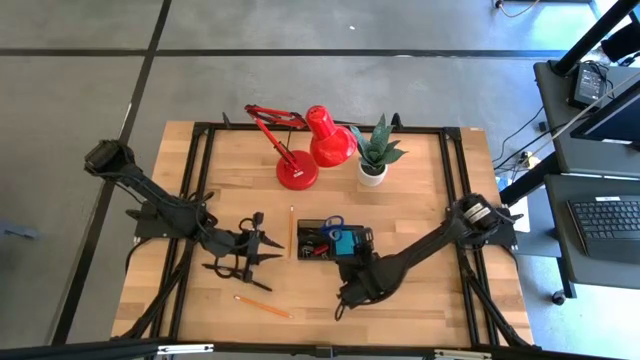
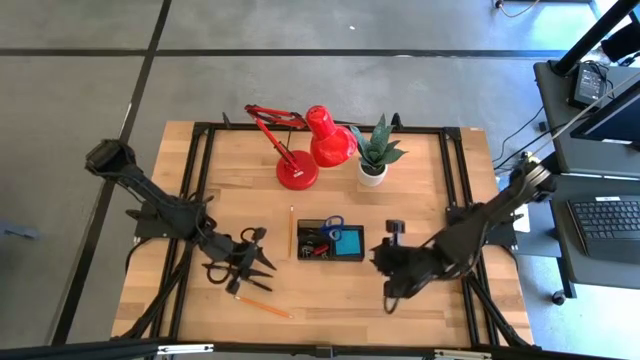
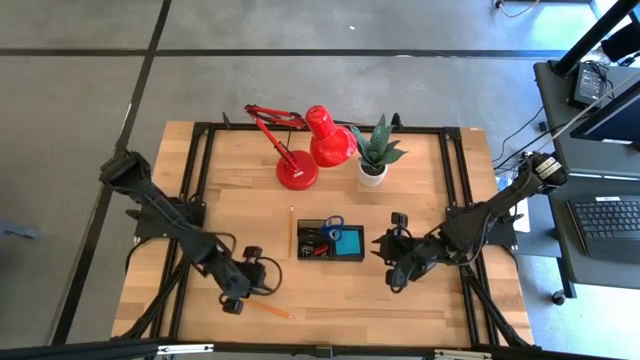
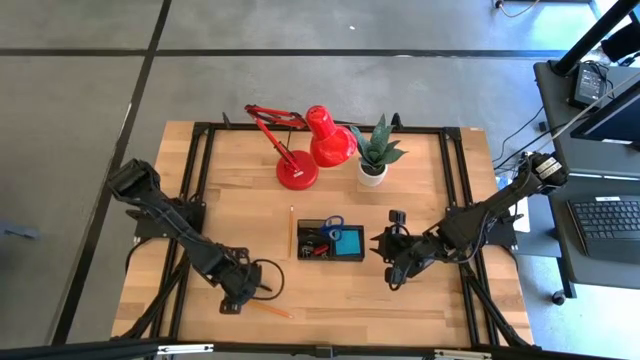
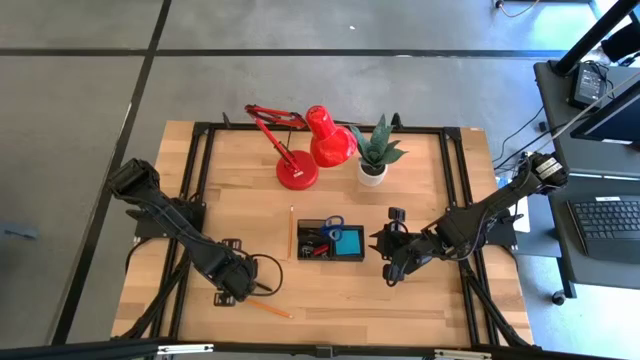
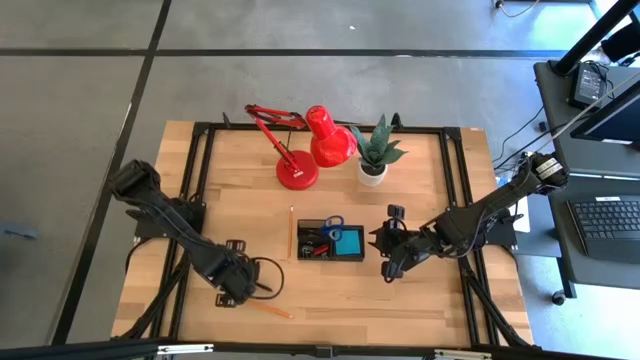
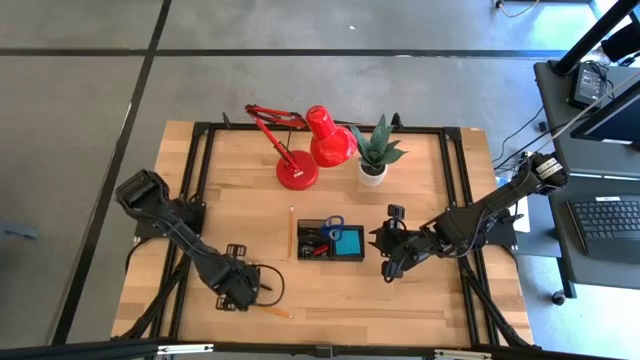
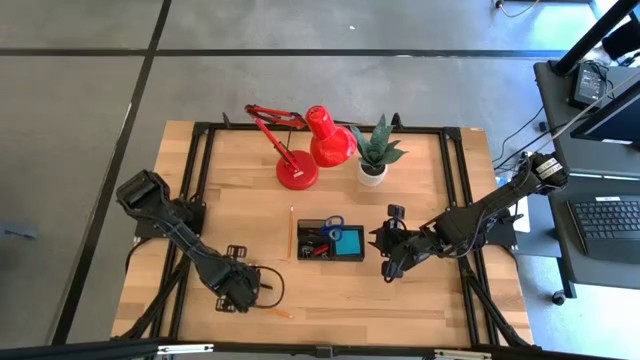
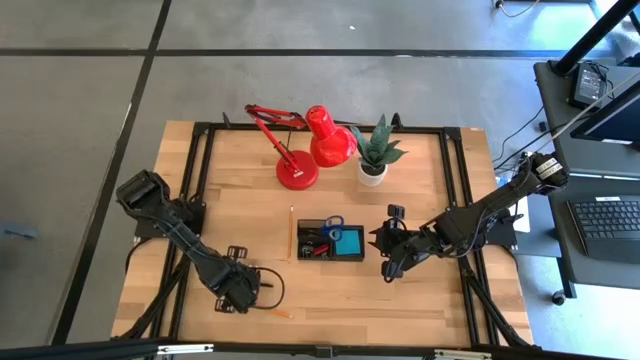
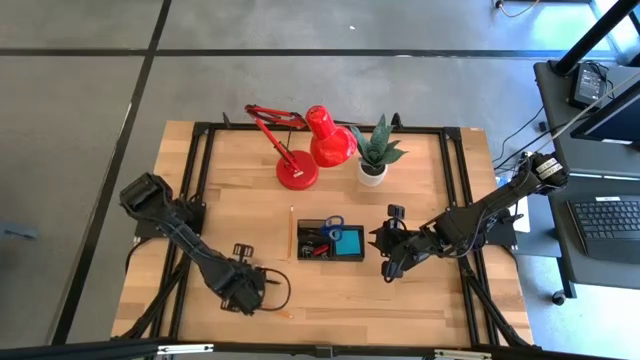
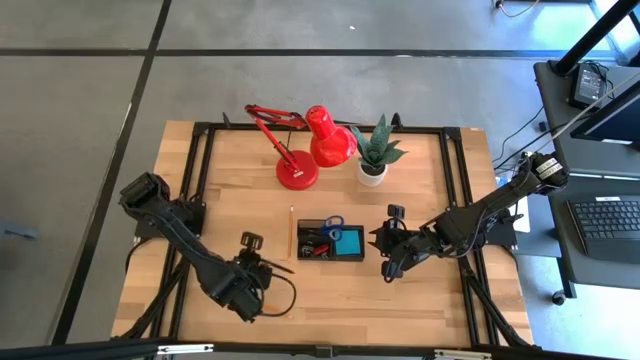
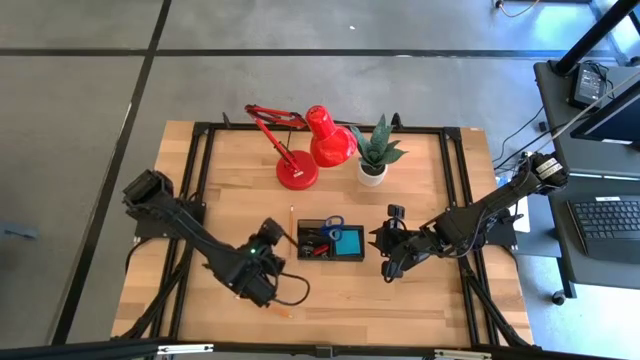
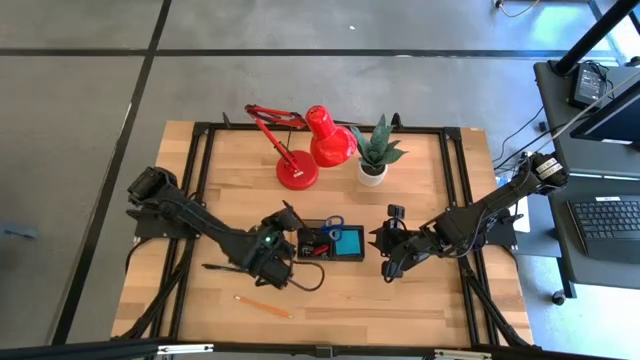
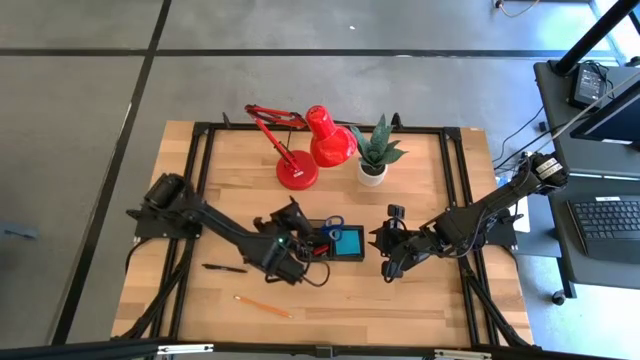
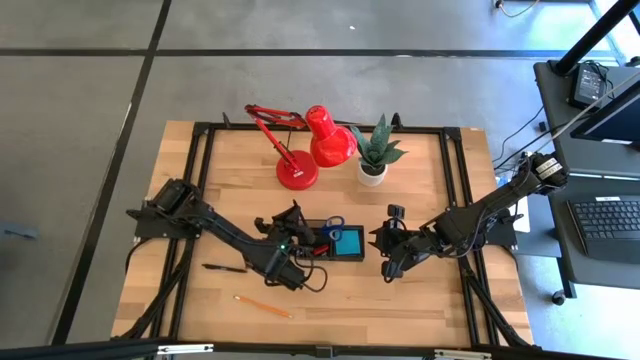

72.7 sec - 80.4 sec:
Task: Pick and place office supplies into organizer
Put the bottom black pen into the black desk organizer

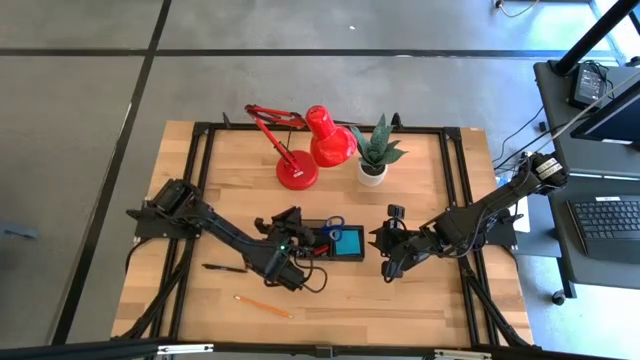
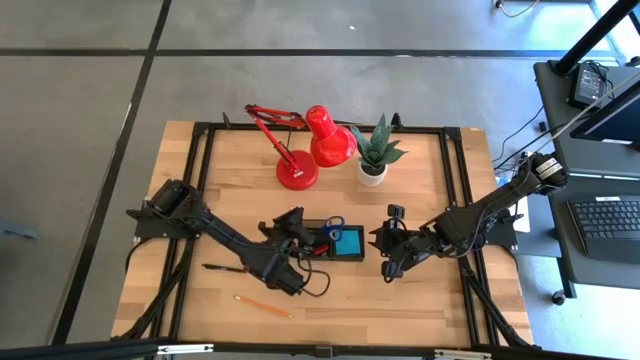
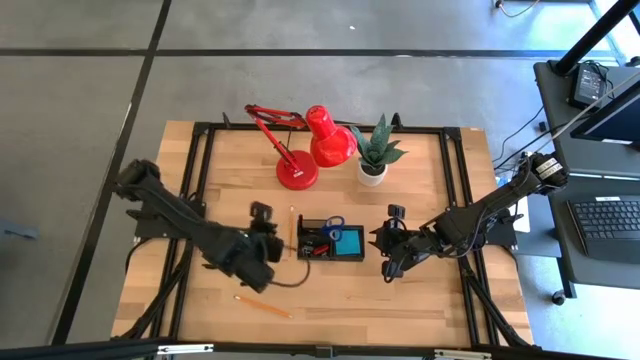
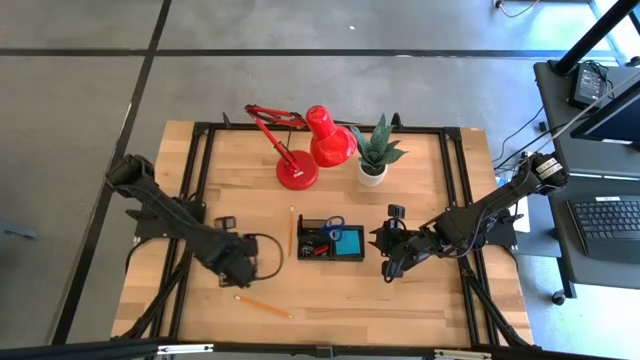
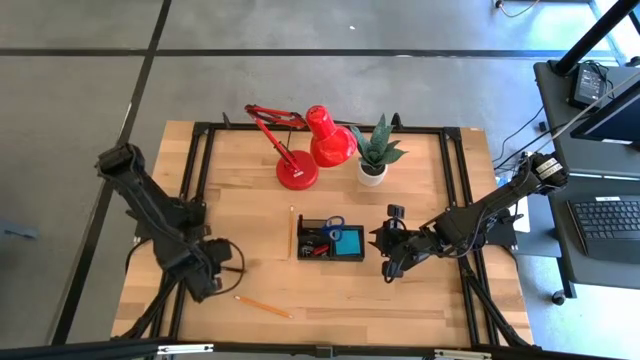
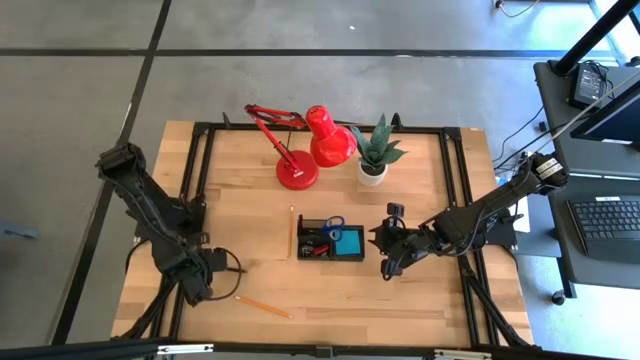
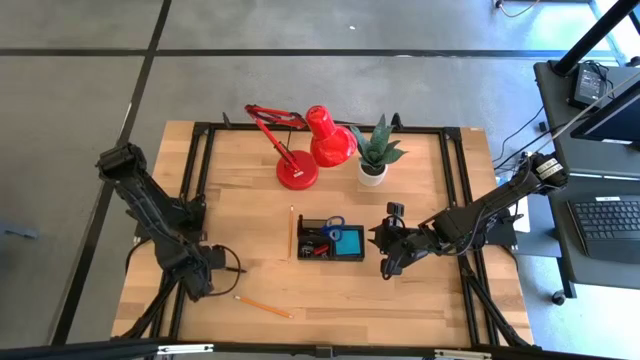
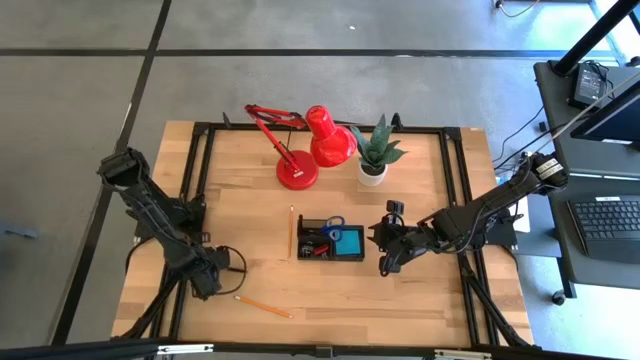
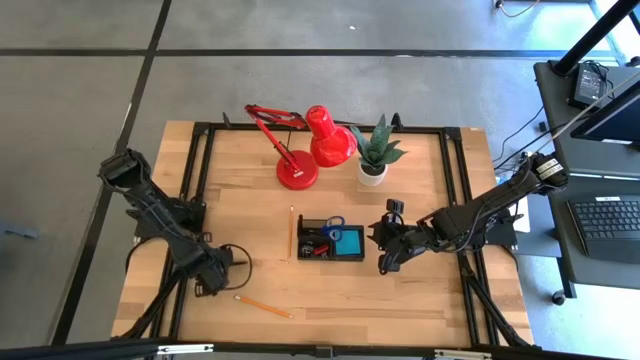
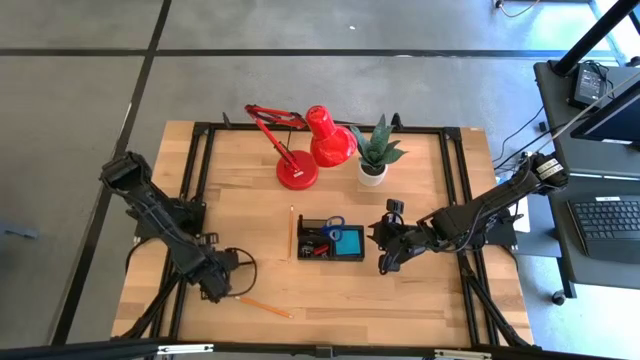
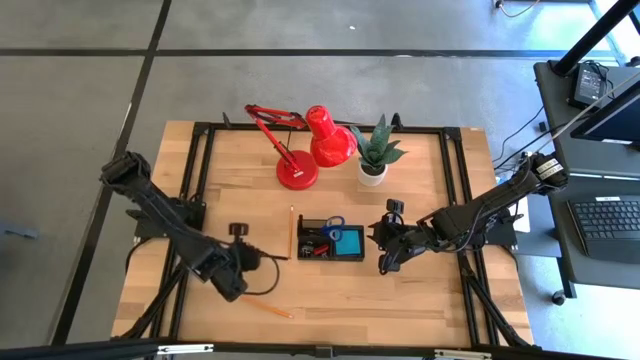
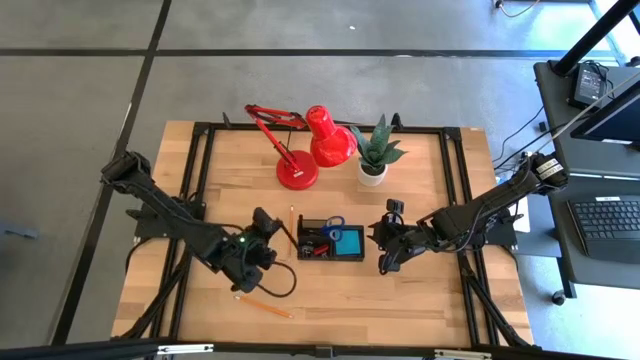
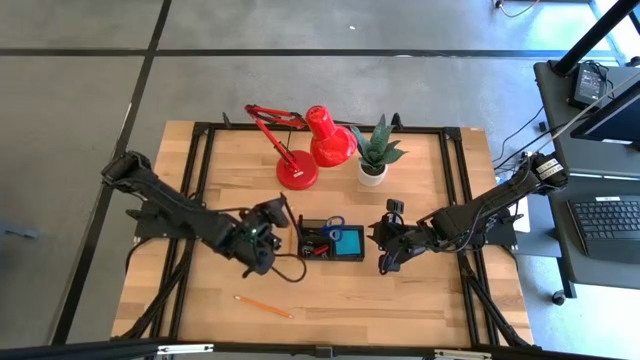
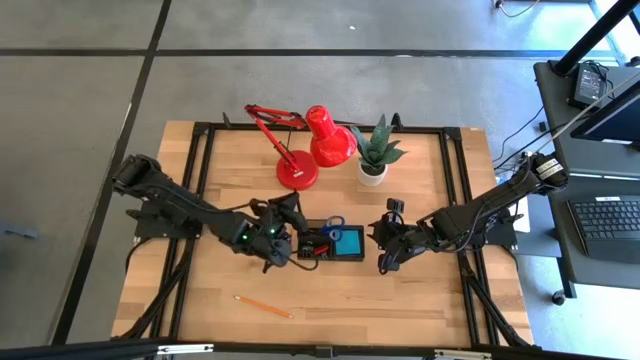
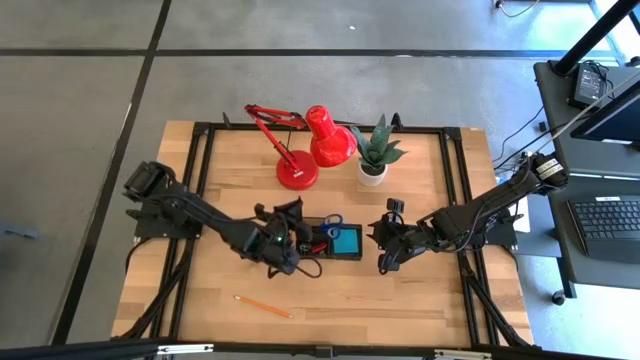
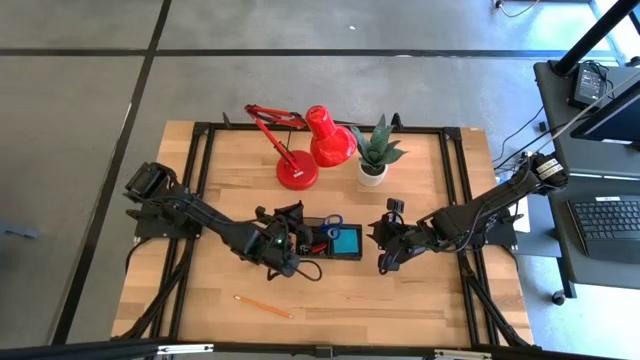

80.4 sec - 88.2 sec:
Put the black pen into the black desk organizer

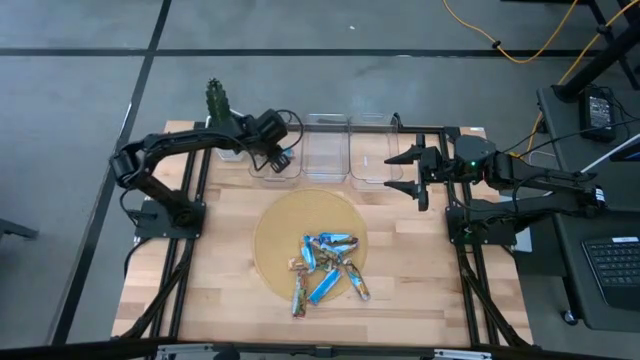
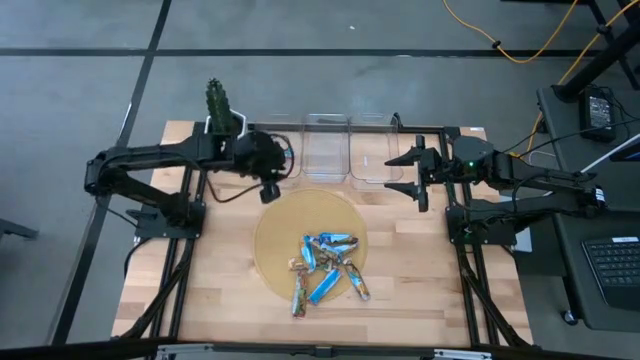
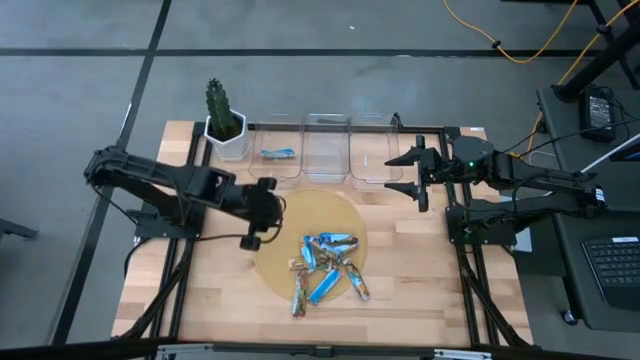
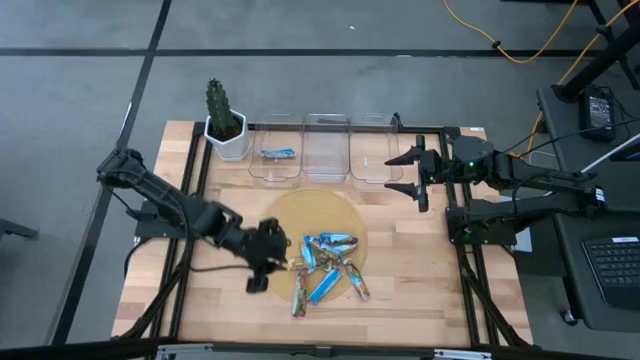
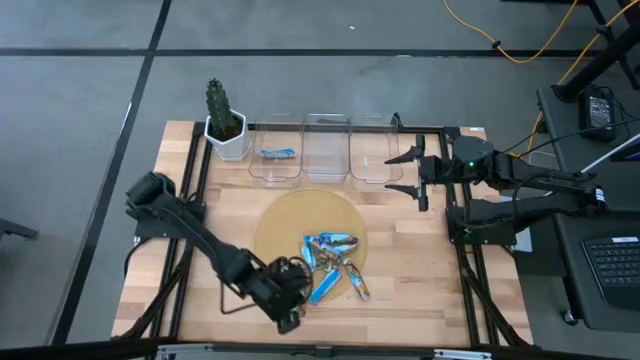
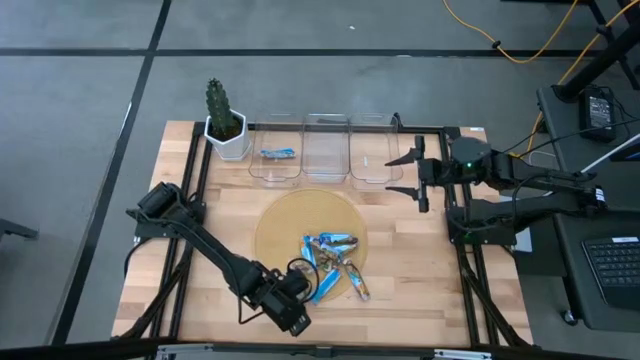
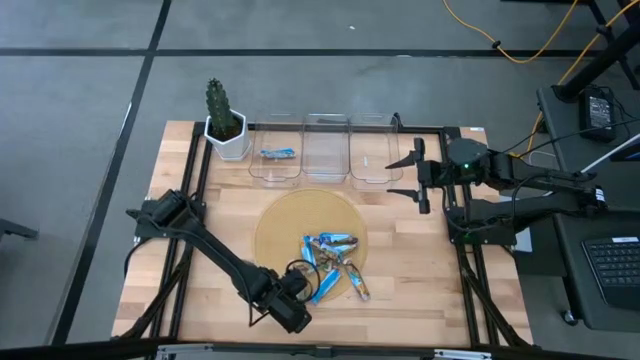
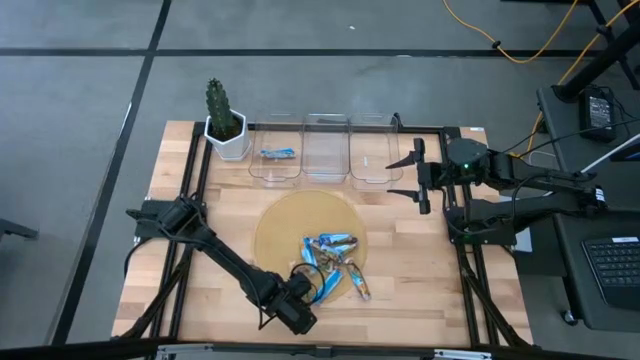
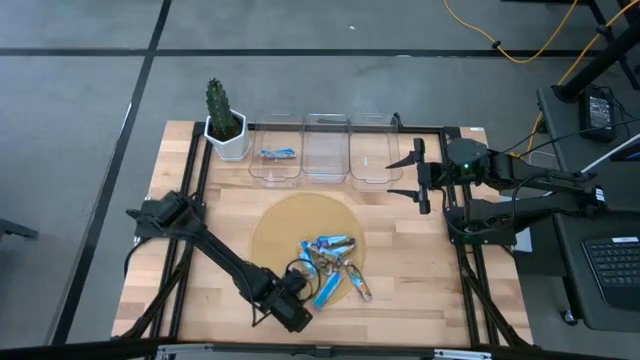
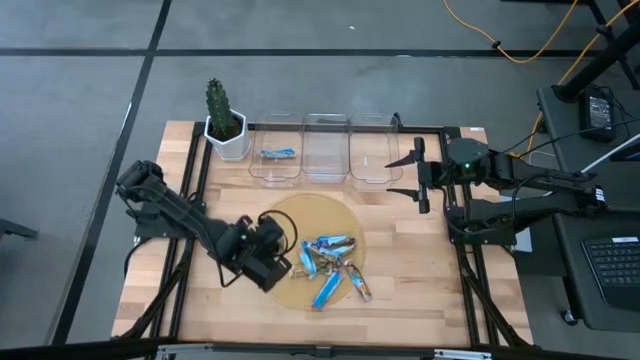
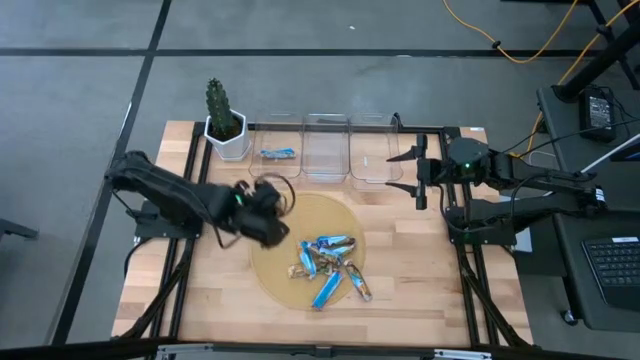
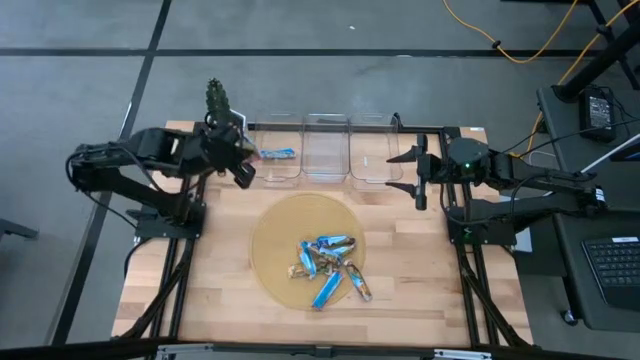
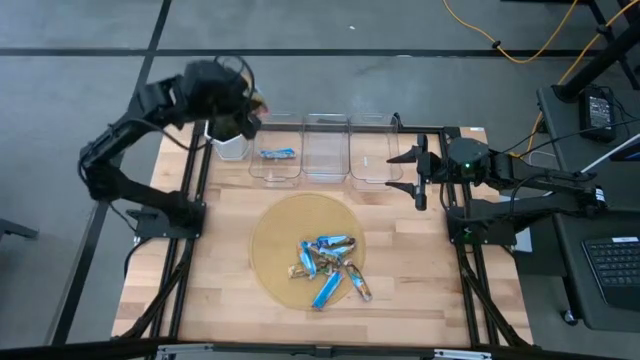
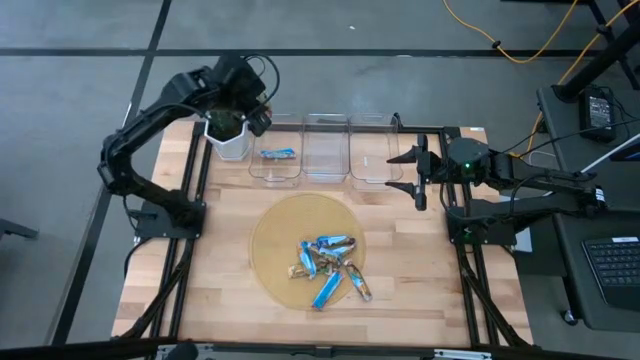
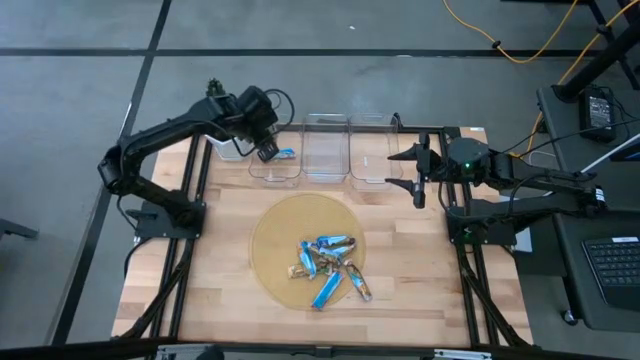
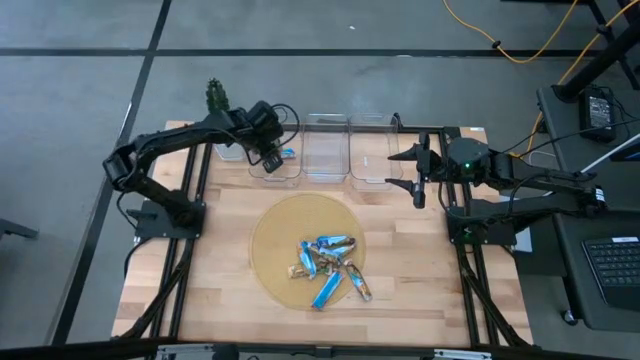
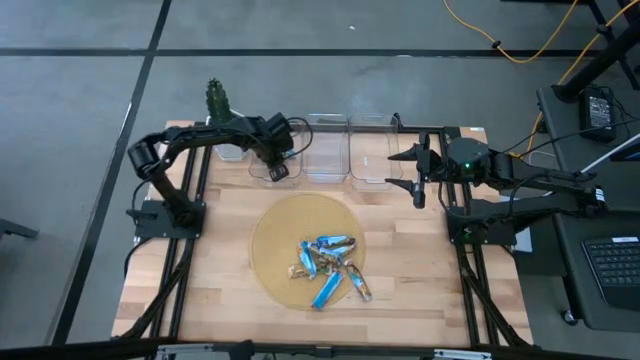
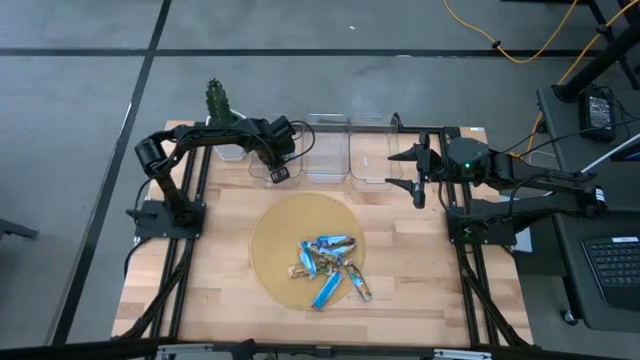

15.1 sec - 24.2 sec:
Task: Pick and place Granola Bars by type
Put the red granola bar into the left transparent bin
